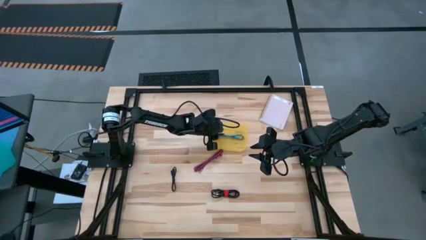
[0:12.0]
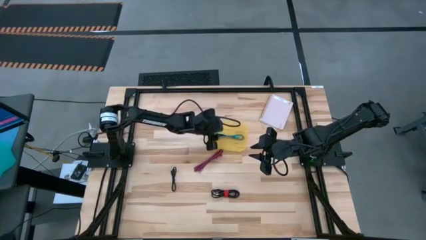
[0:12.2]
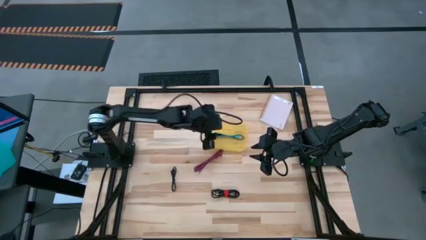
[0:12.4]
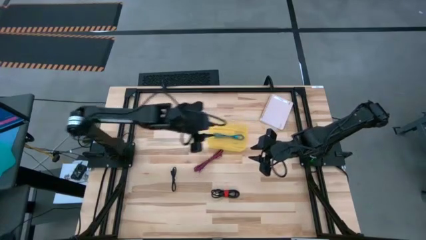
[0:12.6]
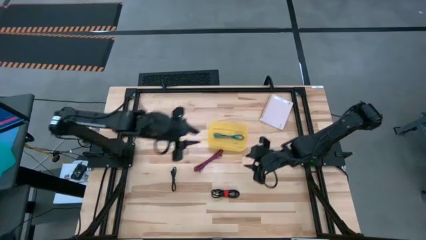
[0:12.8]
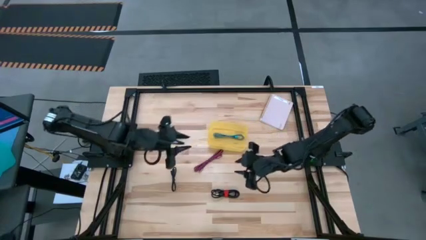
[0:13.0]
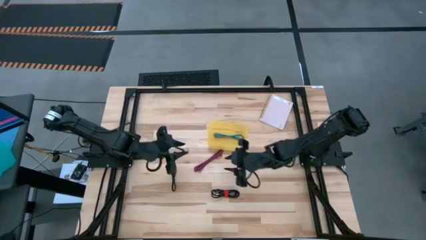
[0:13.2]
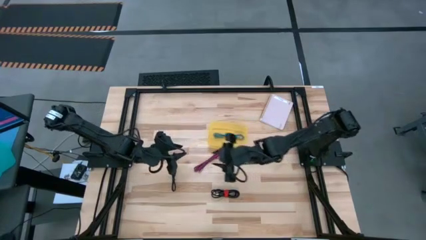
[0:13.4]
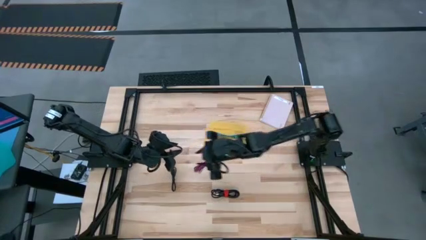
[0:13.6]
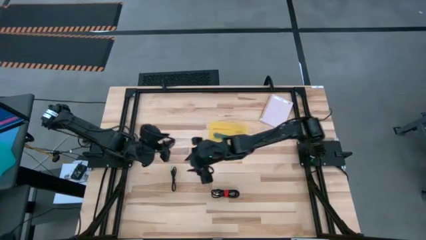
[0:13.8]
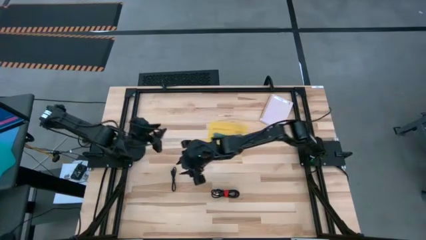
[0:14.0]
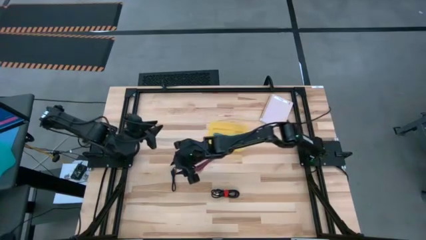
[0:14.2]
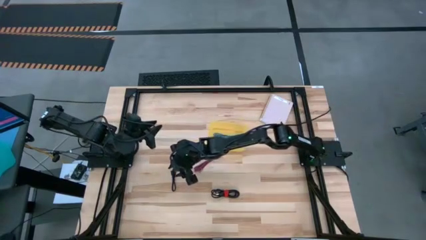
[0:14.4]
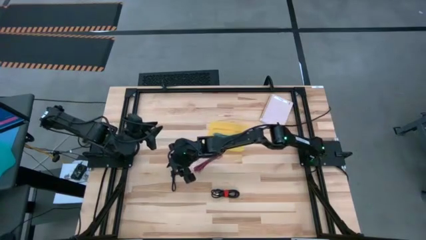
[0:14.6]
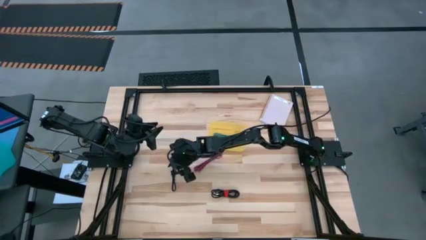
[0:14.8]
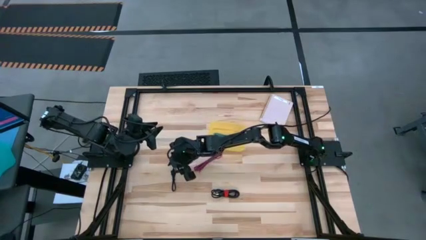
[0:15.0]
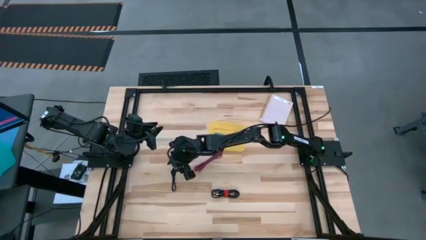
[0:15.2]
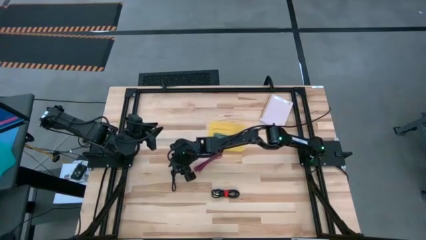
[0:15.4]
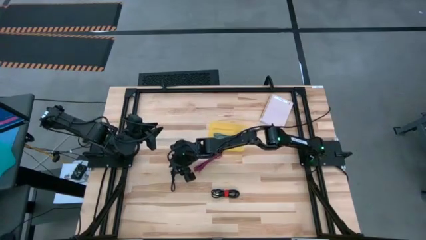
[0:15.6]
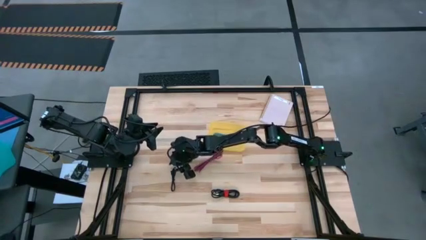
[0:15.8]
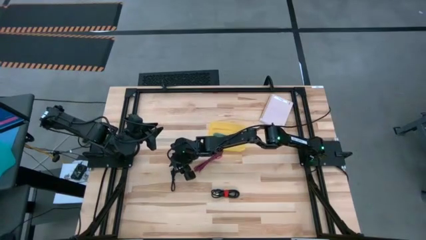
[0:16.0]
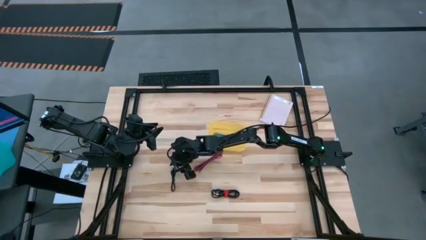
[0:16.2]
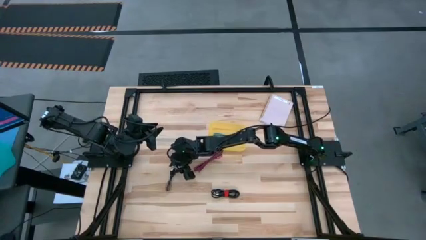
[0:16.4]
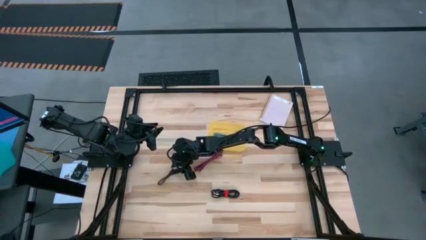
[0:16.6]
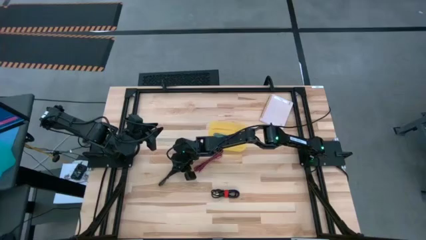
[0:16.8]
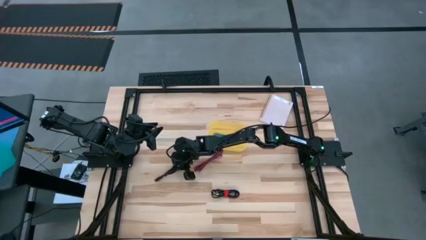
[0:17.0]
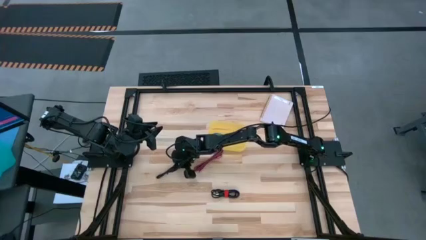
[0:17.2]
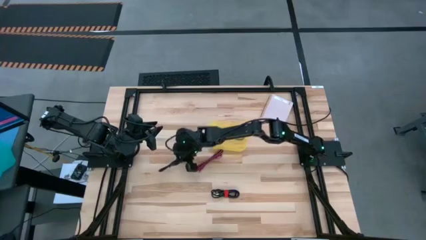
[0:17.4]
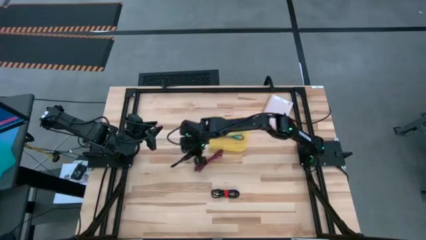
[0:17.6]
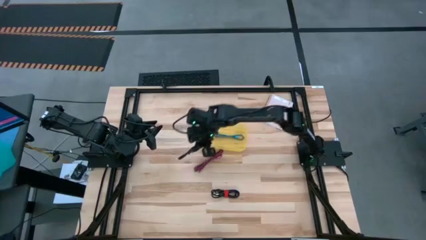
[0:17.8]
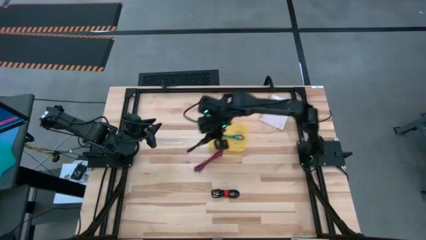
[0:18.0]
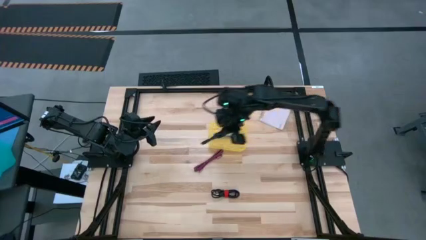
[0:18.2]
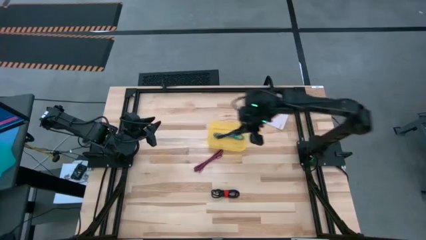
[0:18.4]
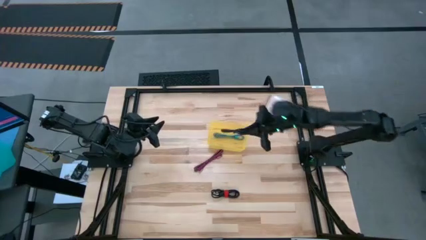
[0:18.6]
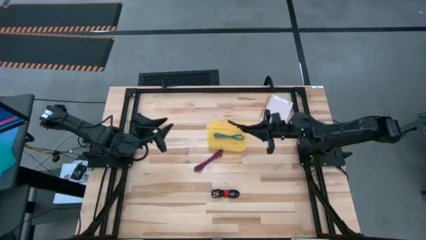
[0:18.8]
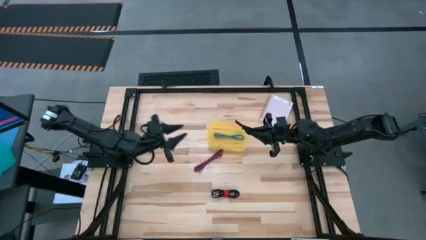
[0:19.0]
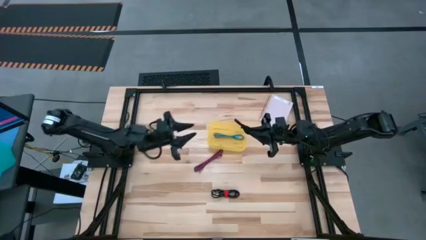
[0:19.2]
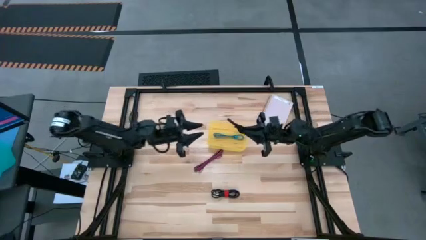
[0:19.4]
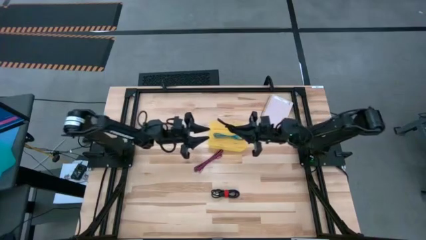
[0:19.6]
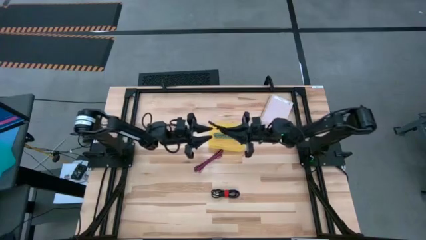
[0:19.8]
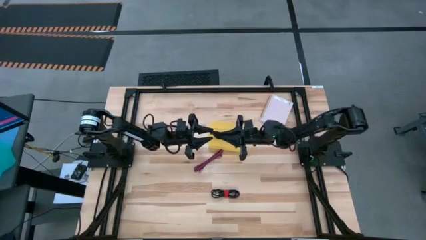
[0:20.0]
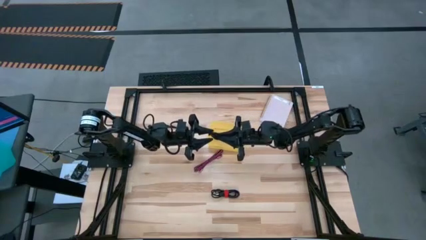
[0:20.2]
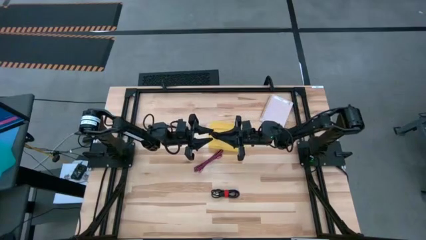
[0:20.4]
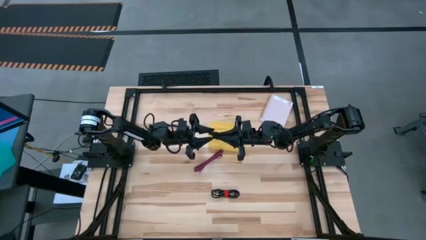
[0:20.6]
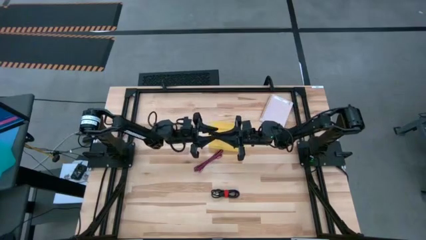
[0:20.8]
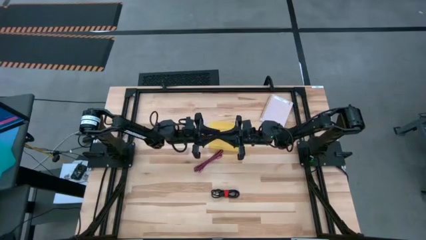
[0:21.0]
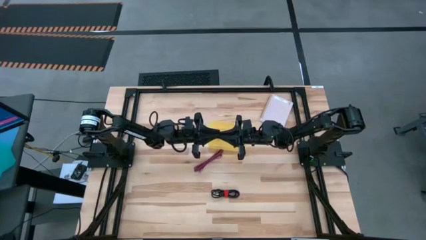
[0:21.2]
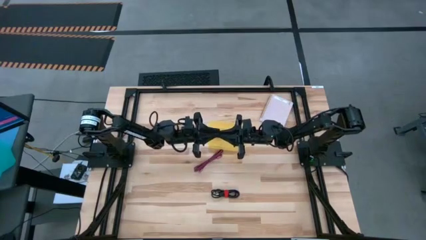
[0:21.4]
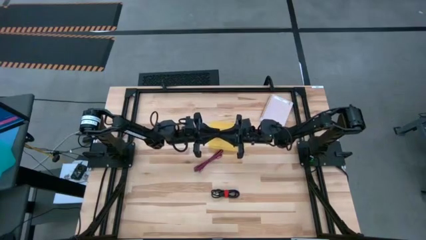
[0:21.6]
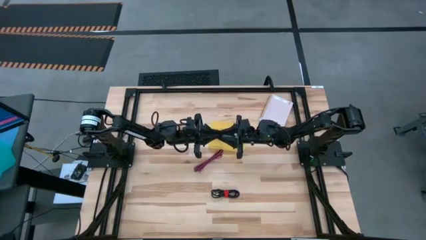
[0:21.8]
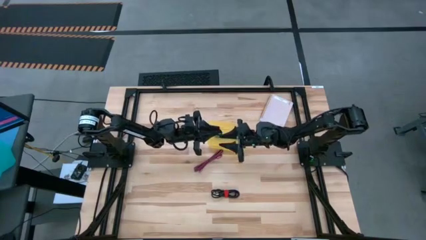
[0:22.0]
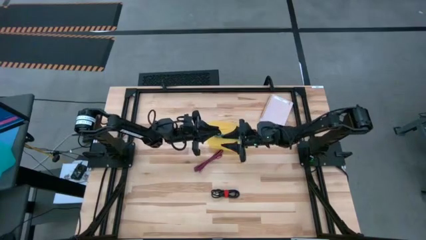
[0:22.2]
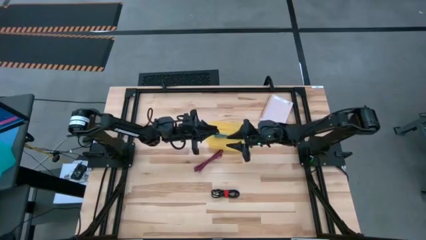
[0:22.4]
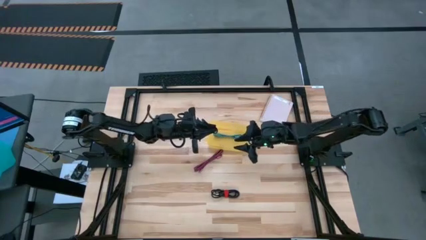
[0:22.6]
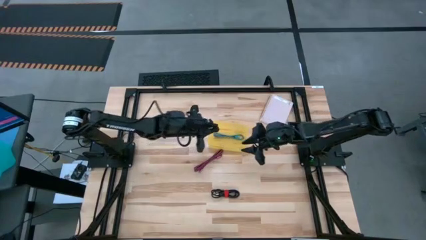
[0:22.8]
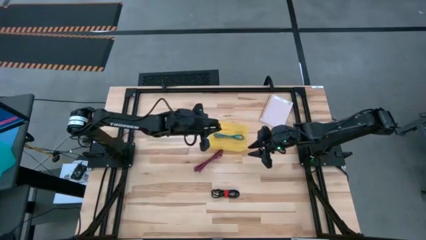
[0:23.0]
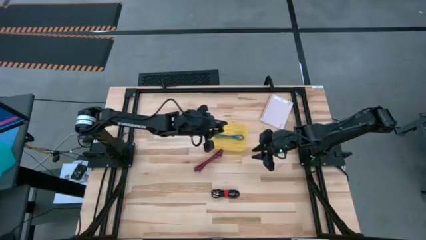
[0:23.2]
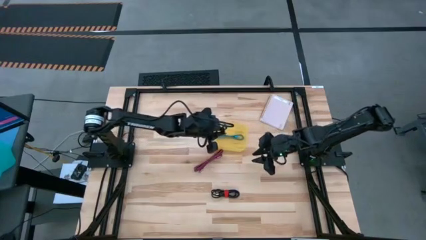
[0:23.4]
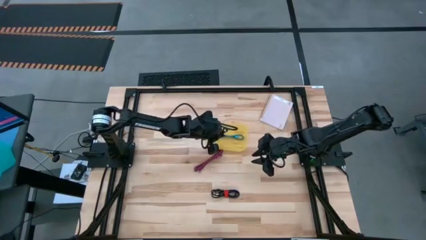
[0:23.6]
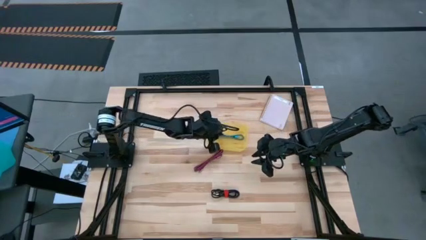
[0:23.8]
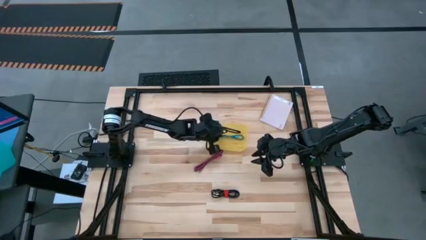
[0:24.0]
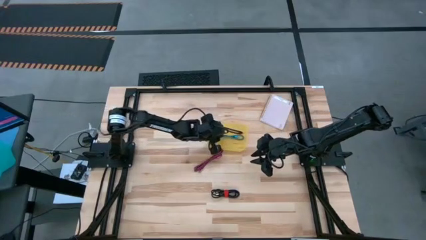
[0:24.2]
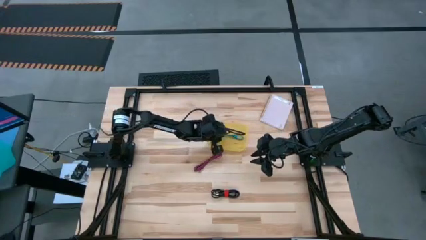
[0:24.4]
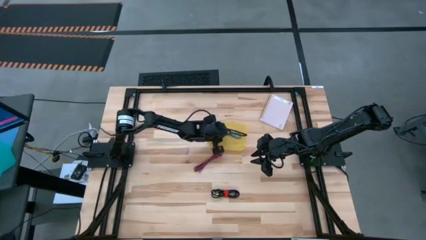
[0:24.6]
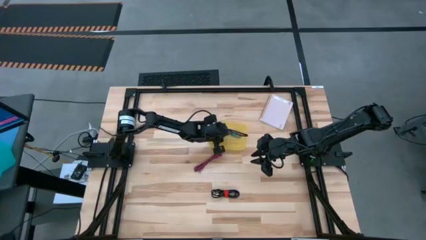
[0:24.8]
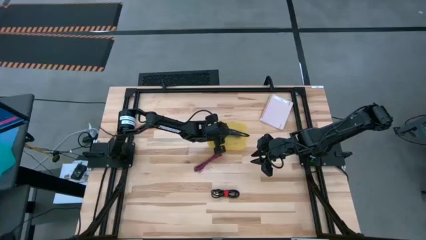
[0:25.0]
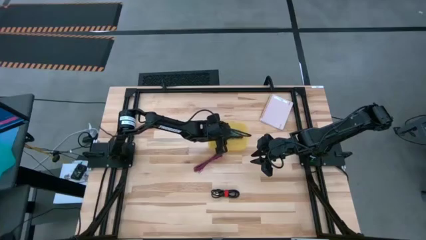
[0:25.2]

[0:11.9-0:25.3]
Task: Pick and place USB-C Cables
Put the left black charger cable into the yellow bin
